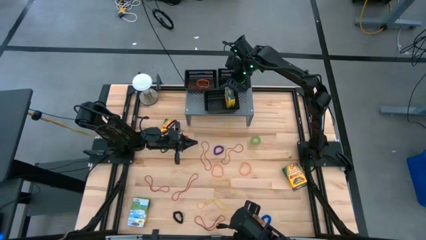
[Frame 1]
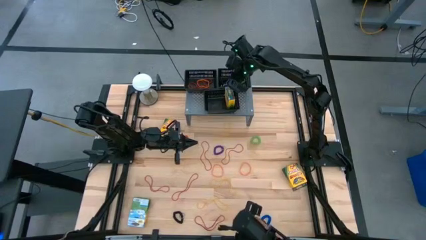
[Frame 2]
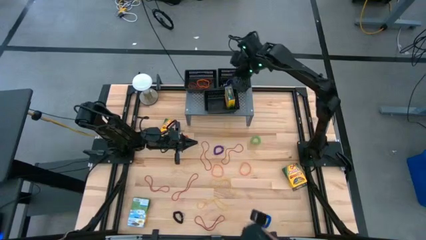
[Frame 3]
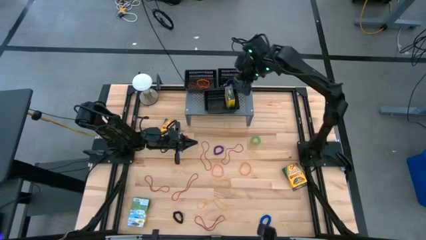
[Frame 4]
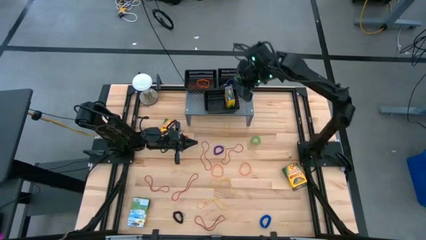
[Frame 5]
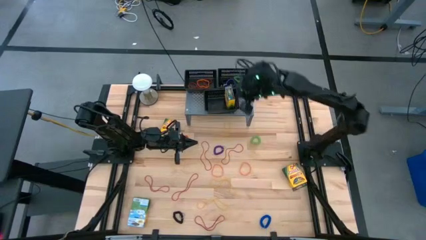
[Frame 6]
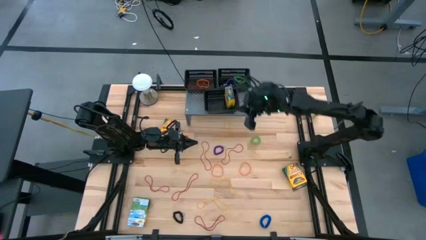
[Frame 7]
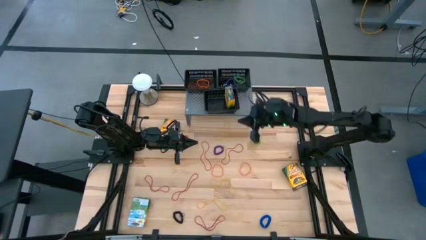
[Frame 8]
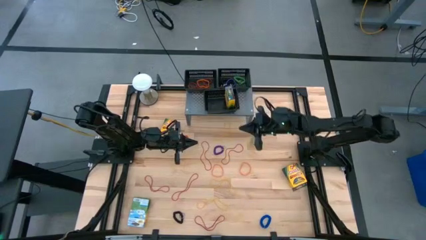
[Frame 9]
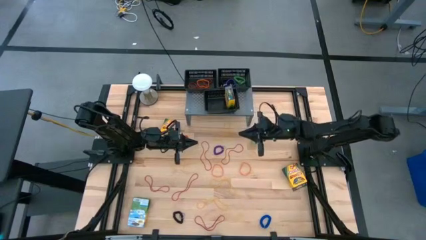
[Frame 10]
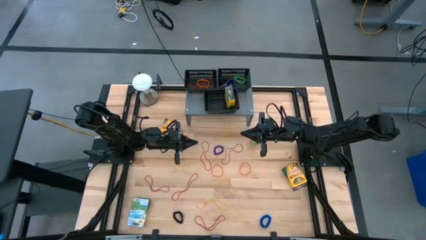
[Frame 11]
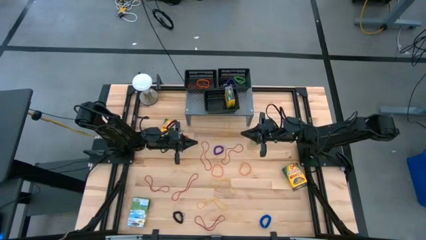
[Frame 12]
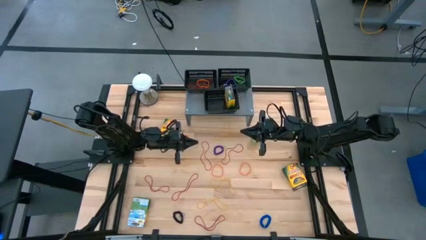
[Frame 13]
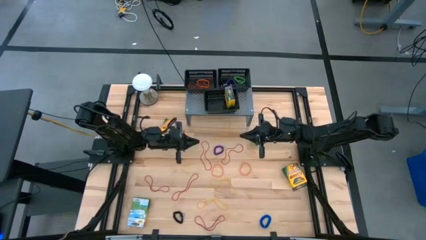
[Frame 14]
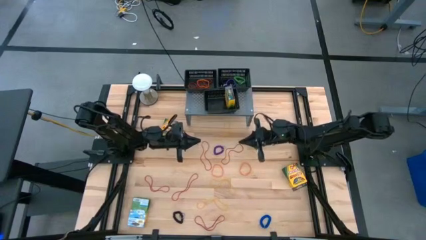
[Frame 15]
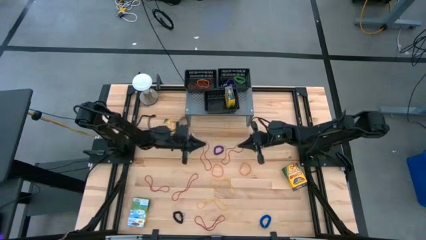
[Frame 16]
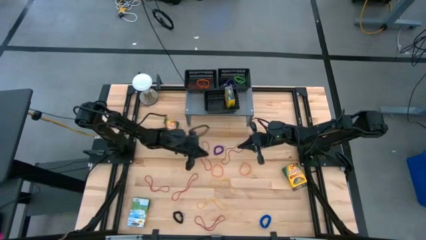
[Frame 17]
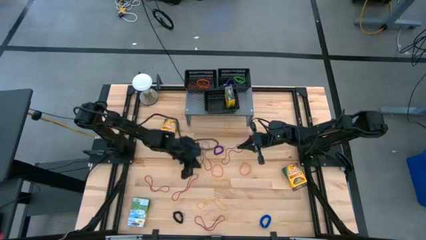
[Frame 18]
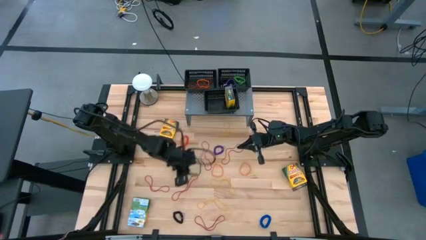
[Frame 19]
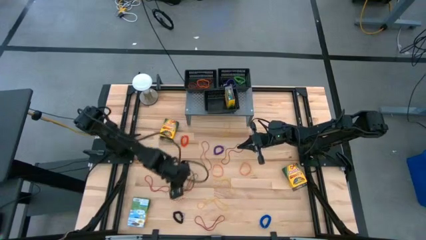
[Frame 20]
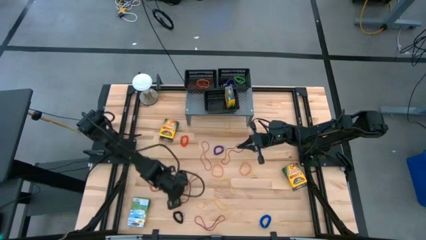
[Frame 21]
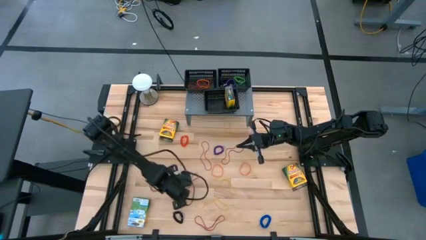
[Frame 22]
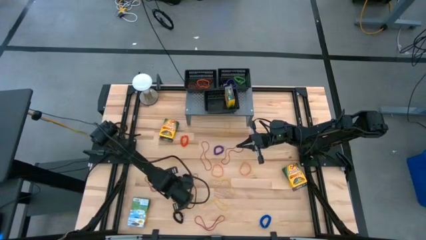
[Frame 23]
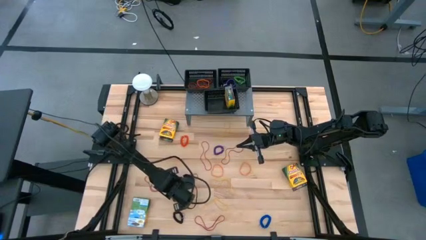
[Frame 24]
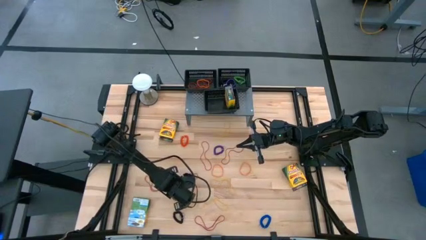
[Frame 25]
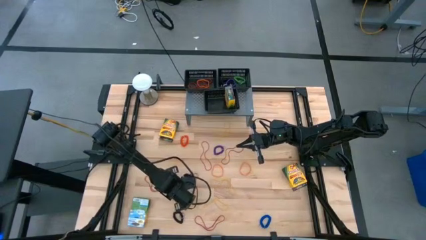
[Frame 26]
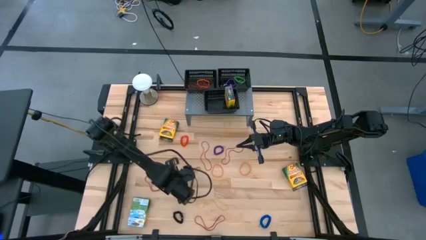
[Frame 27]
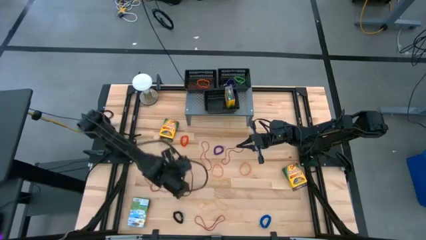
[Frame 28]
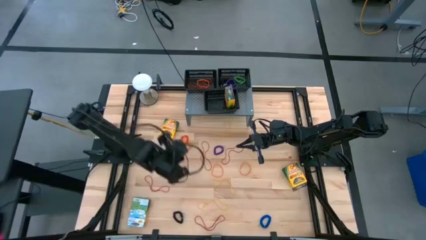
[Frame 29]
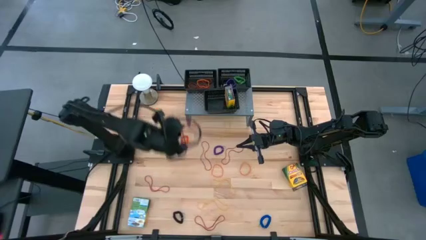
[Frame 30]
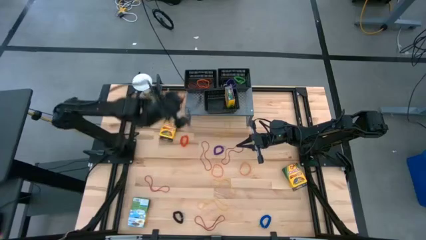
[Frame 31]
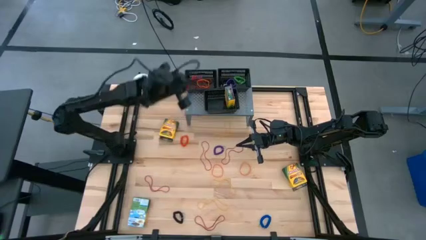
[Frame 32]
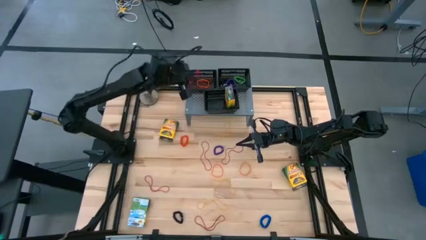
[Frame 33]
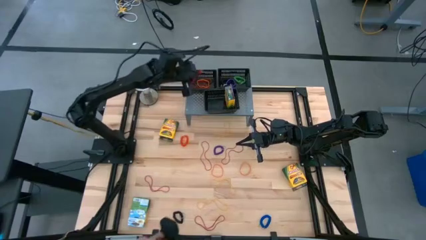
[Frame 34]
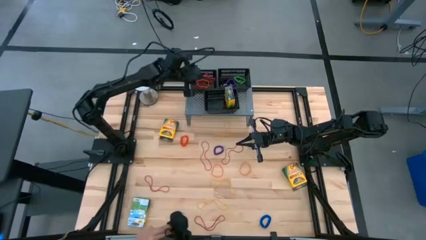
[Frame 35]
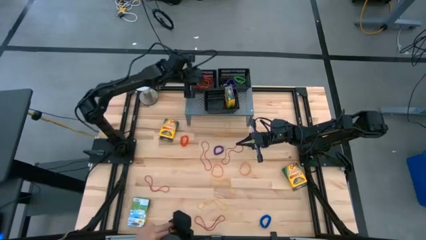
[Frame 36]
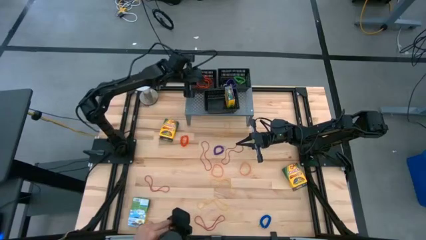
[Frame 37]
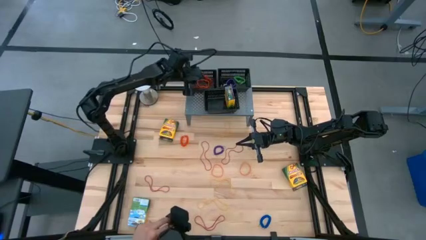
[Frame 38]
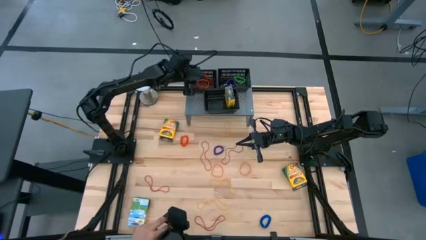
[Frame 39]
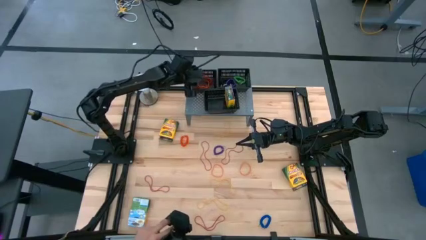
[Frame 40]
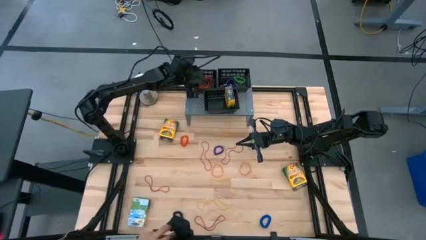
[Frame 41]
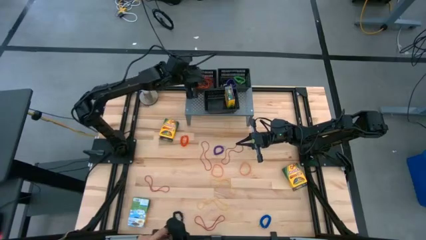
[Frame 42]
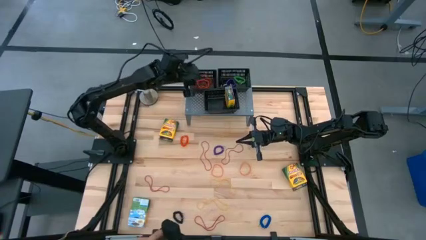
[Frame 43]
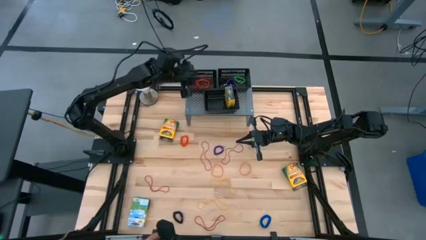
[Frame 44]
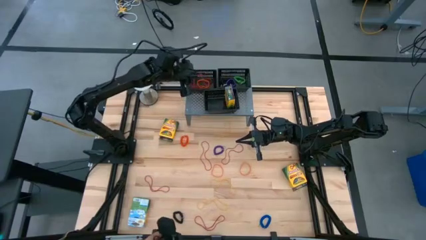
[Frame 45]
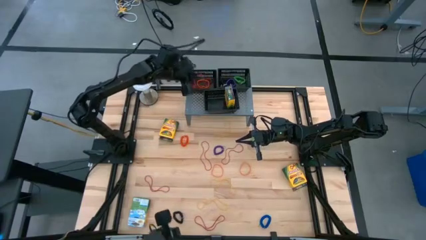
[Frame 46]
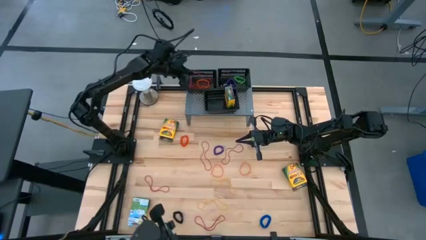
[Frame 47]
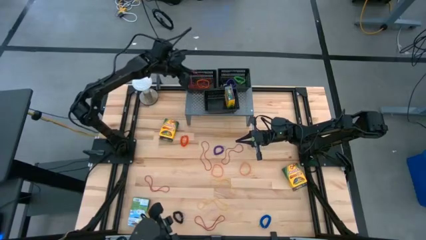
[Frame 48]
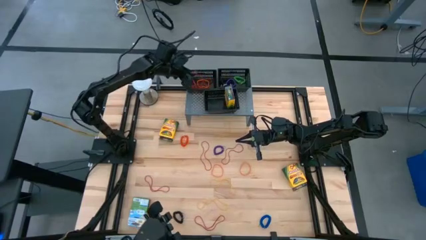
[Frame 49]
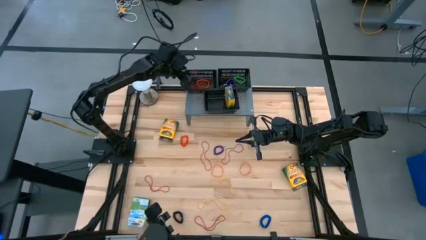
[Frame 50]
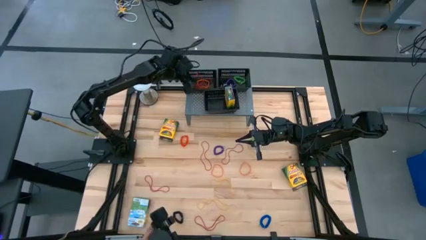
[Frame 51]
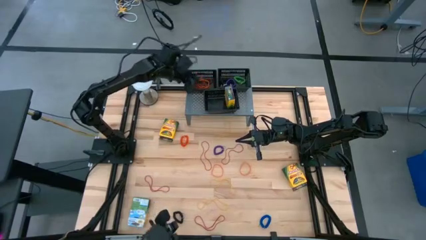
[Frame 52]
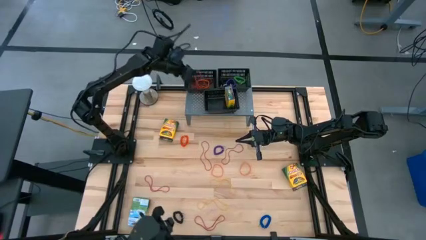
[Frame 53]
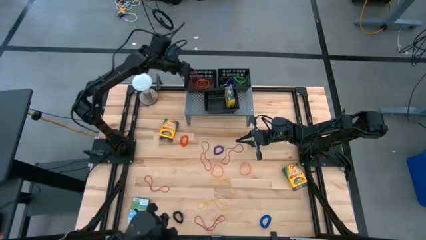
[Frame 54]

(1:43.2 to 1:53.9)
Task: Pick & Place Office Desk Supplies
Put the red rubber band into the top left black basket on the shelf

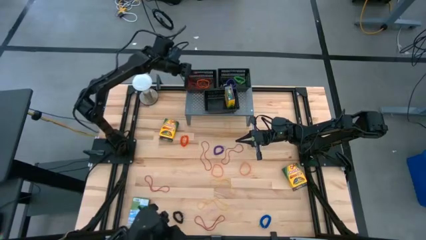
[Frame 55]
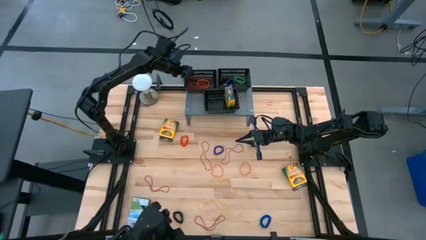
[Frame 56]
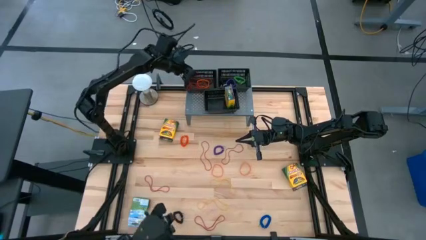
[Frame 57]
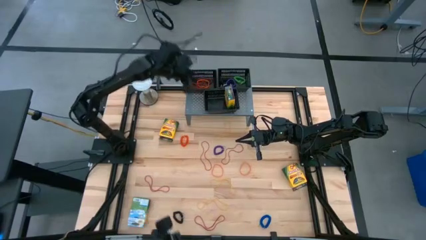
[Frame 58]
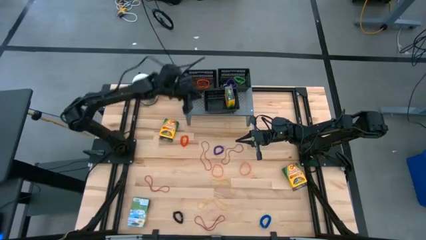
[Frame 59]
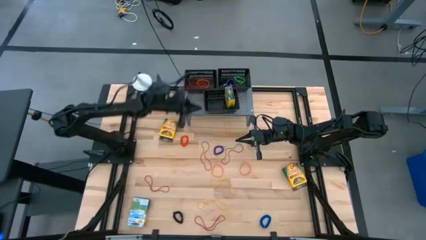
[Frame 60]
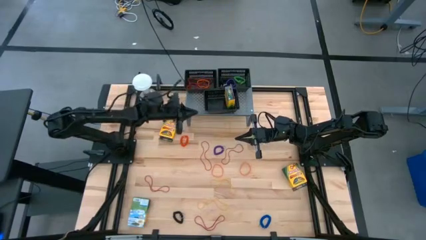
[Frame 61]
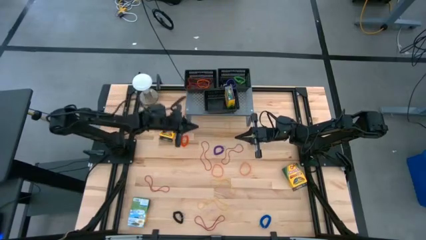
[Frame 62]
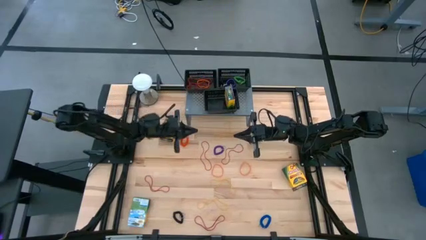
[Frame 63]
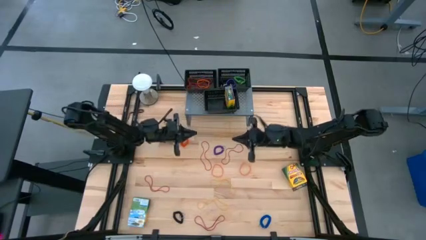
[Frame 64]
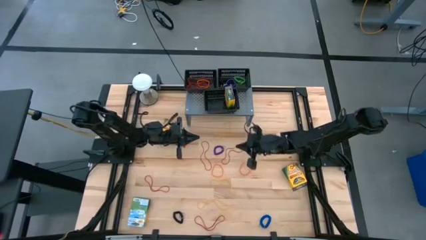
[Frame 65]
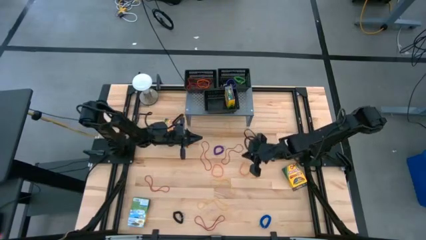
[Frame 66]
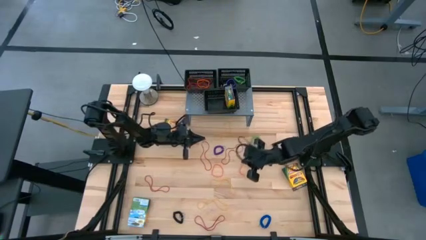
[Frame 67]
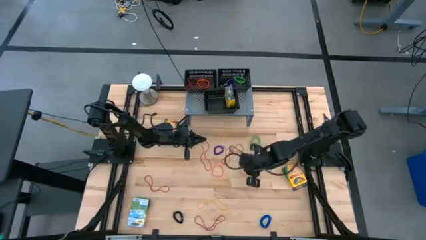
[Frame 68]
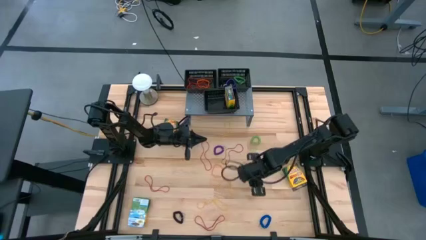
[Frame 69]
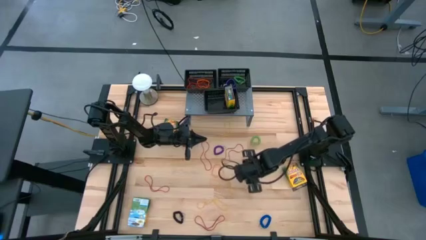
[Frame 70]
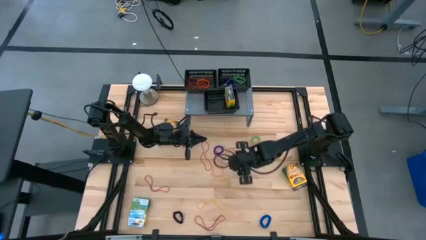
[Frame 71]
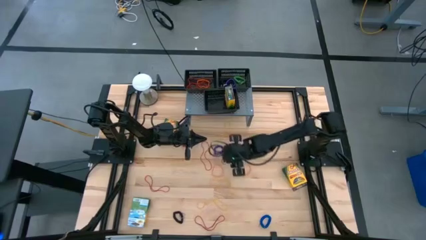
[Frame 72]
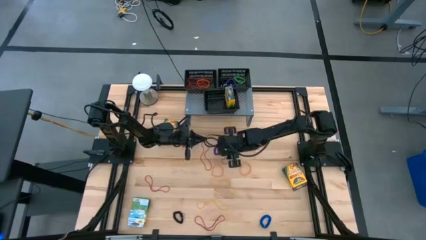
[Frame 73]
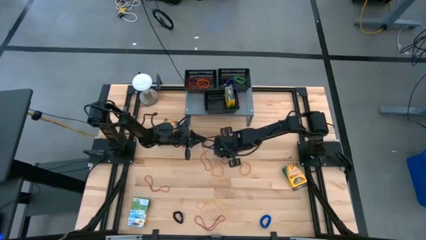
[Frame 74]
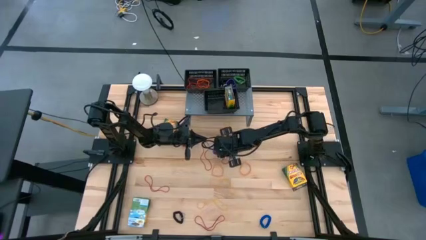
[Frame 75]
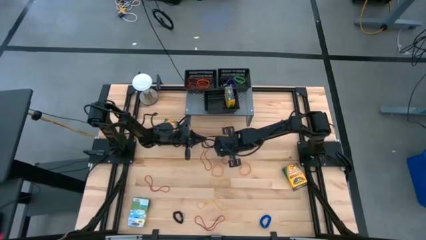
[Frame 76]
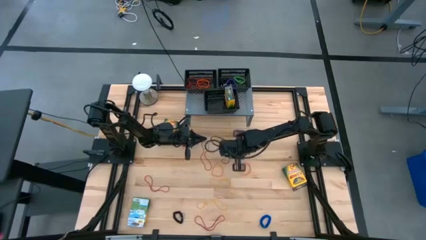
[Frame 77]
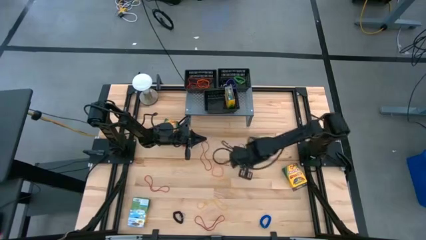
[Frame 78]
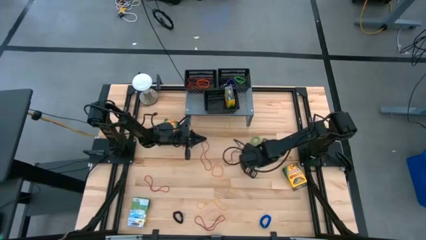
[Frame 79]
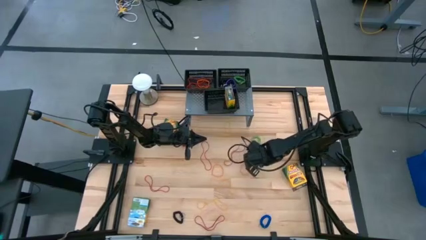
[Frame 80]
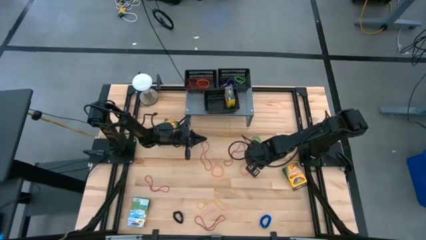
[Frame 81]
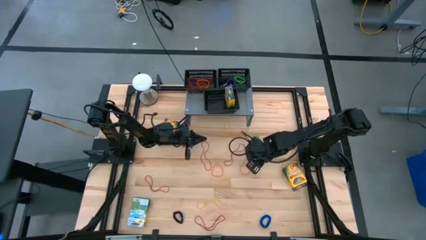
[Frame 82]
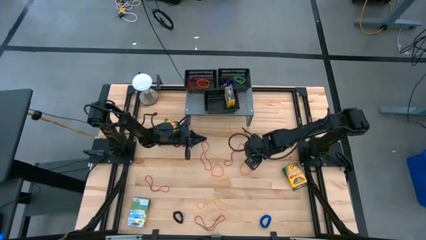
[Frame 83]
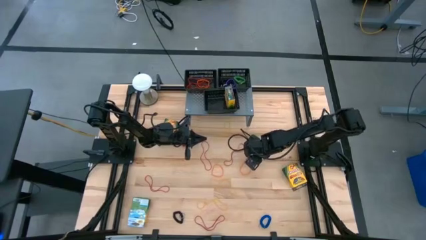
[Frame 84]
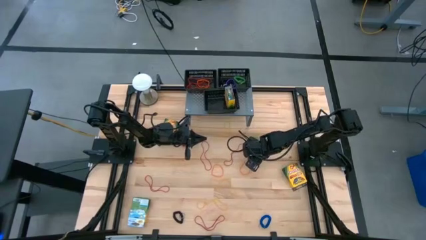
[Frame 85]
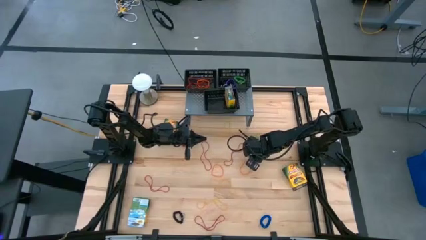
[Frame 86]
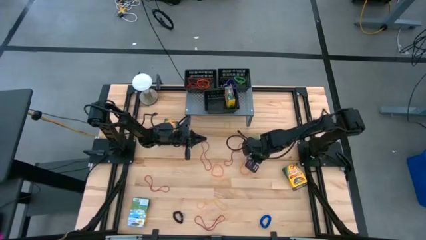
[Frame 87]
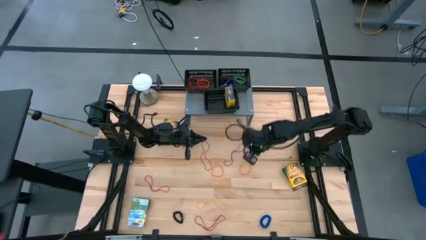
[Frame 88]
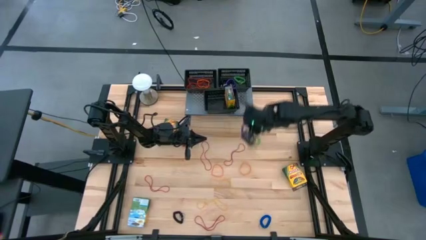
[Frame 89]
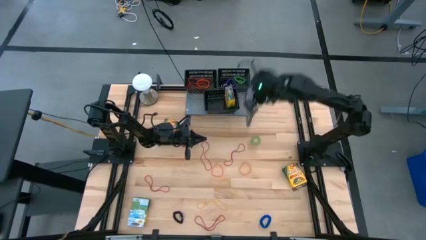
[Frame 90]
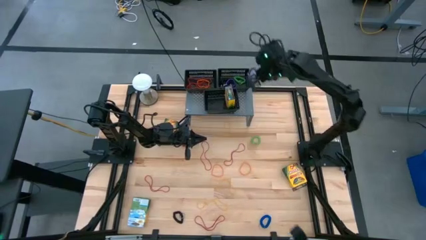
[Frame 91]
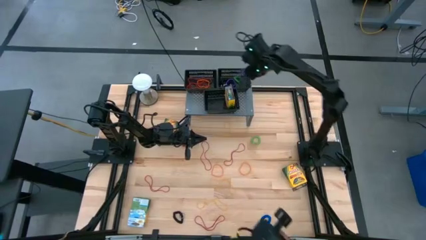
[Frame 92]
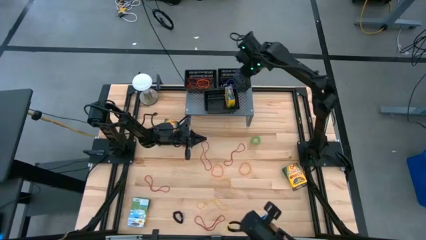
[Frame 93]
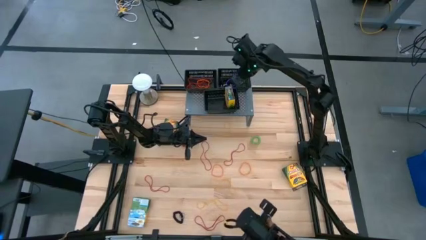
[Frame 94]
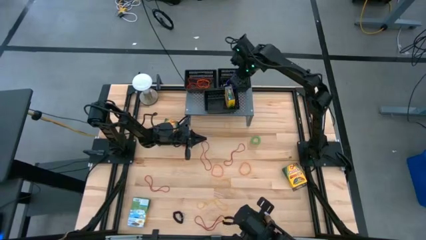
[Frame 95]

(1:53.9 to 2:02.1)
Put the purple spring keychain into the top right black basket on the shelf
